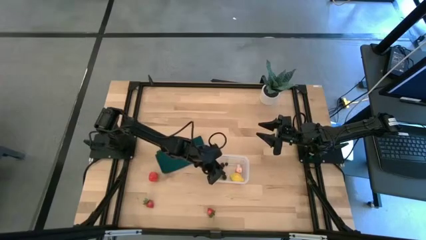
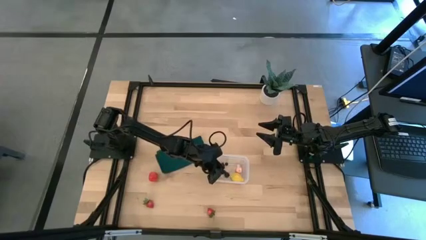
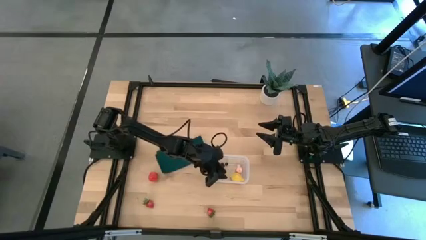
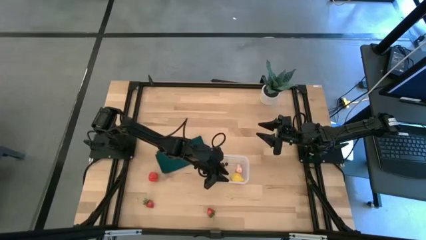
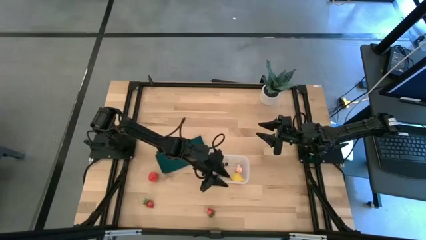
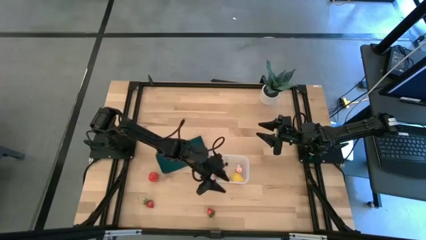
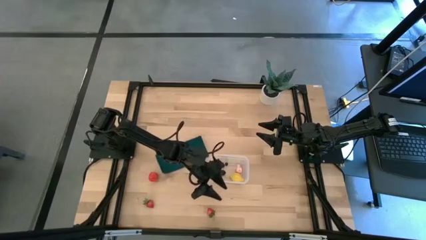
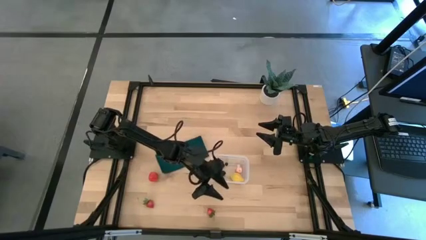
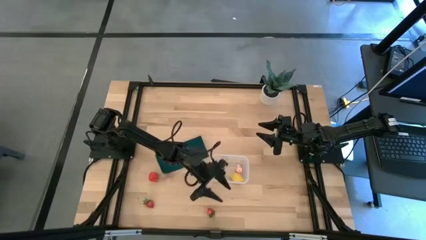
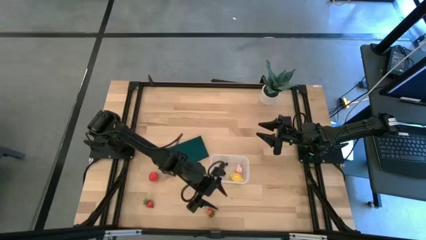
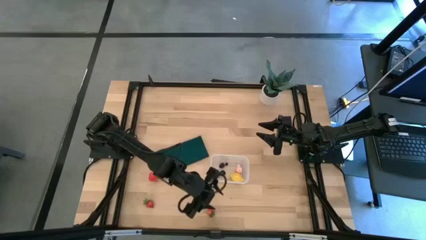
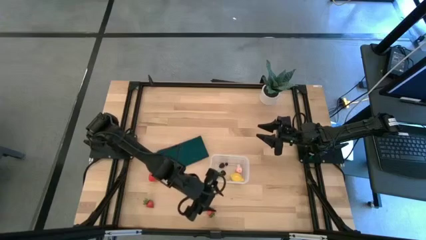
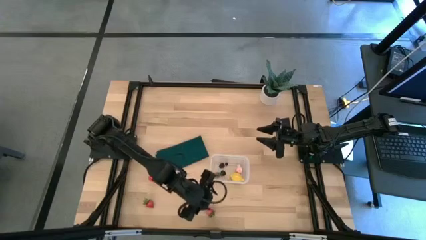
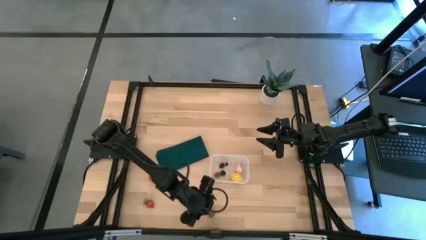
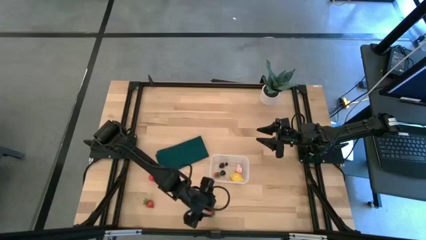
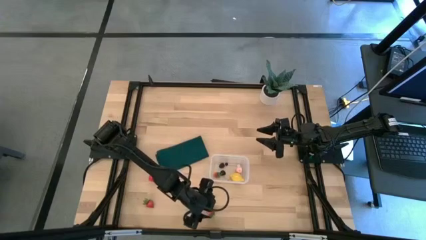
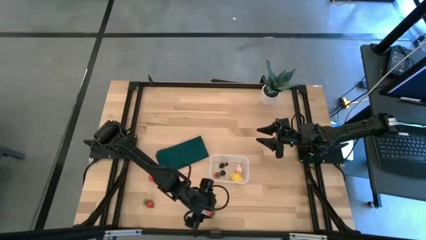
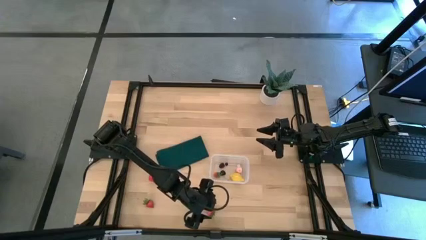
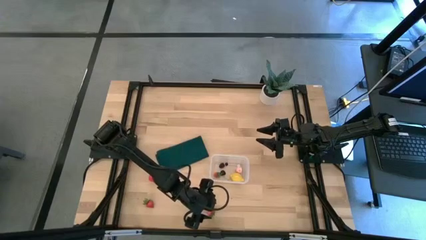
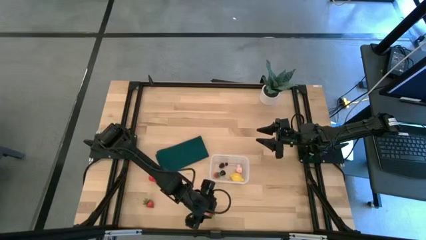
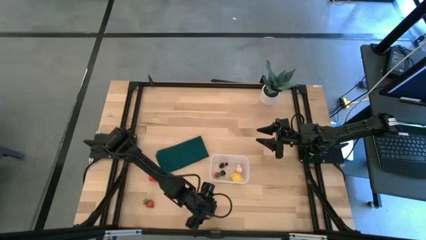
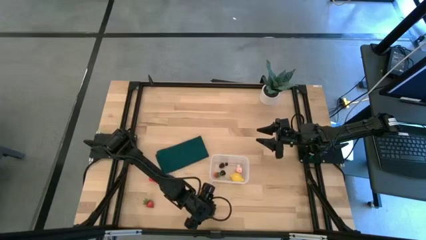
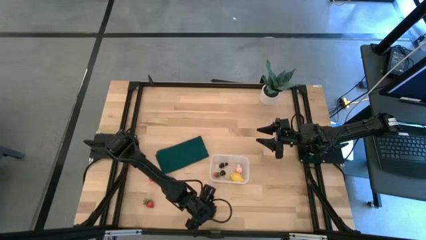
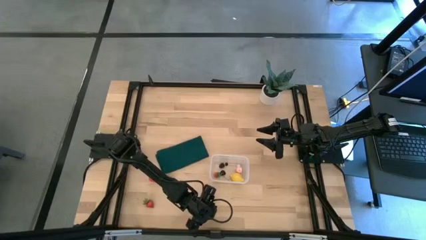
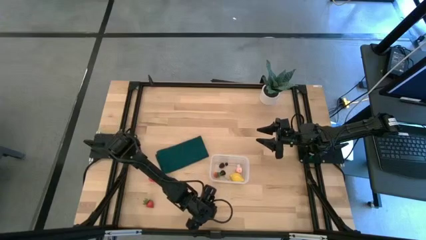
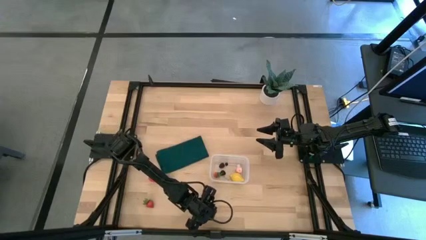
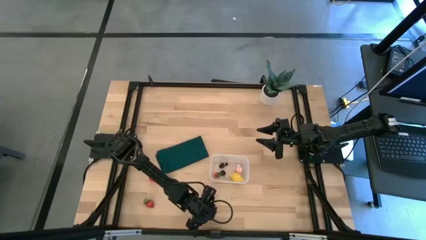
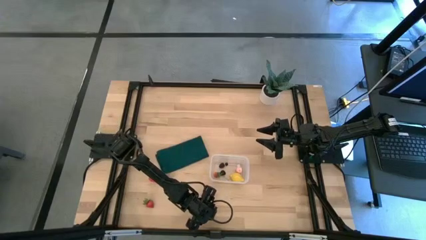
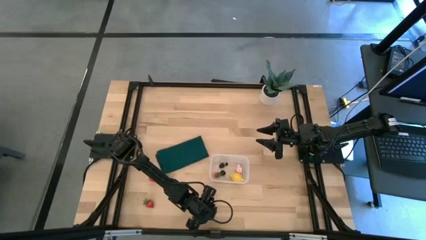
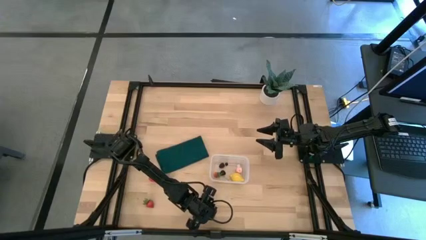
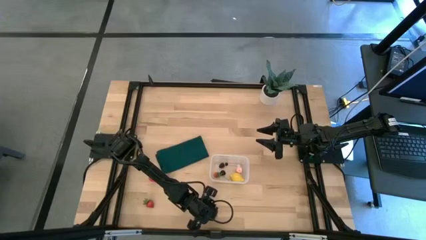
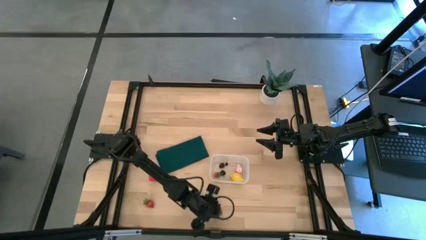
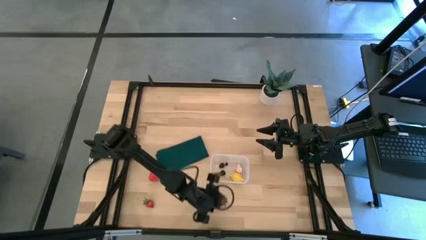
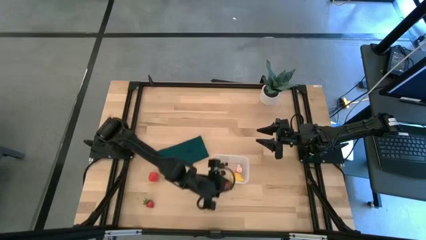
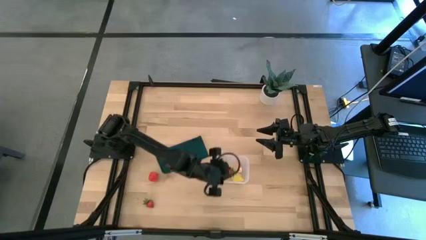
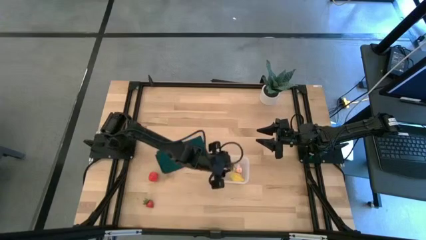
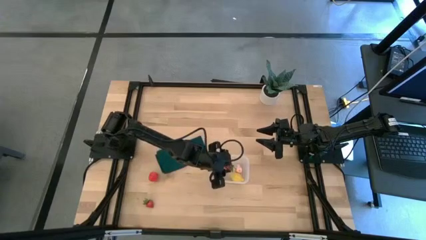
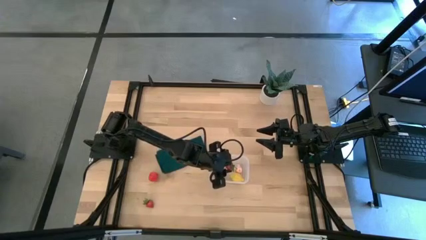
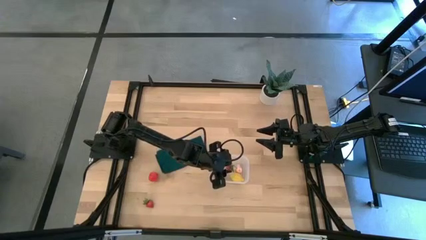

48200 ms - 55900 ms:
Task: Pick and placing Produce into tupperware
Put the bottom right strawberry into the transparent bin

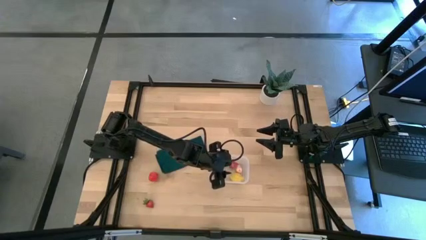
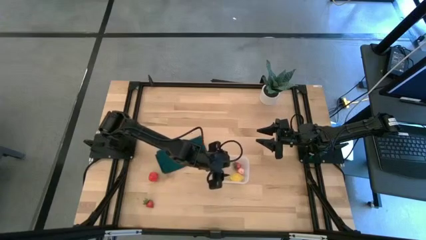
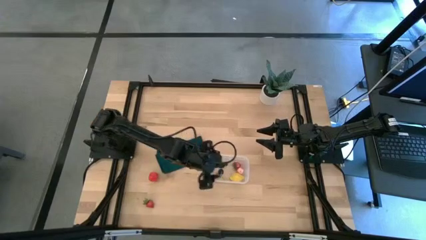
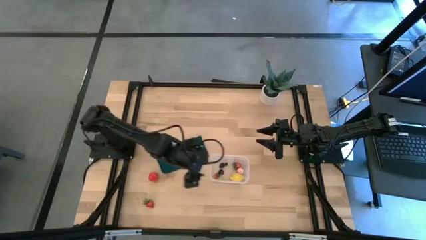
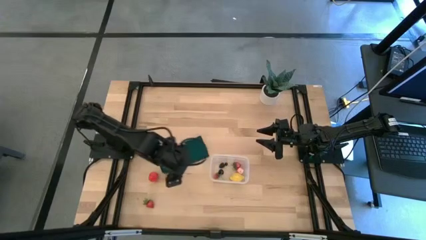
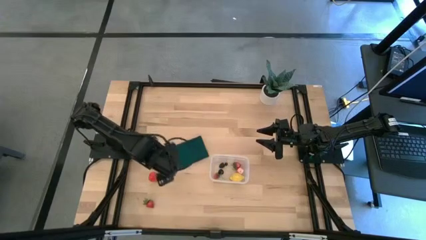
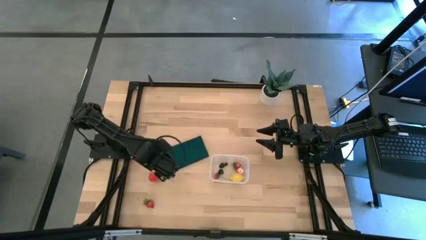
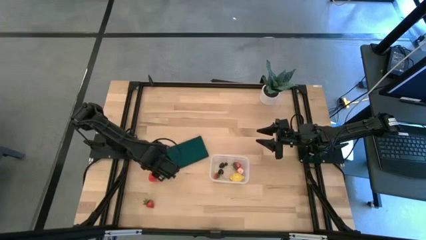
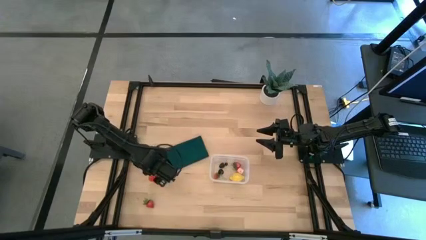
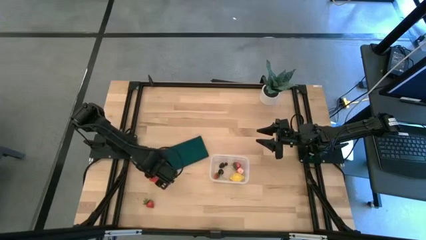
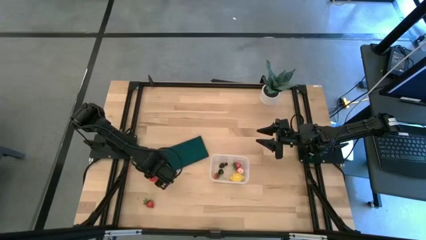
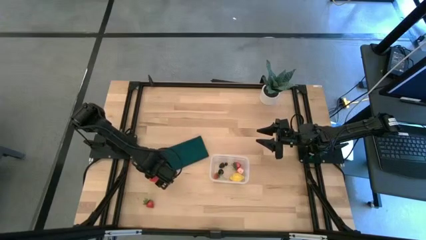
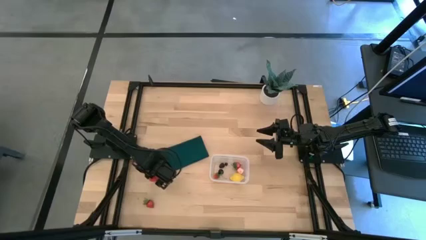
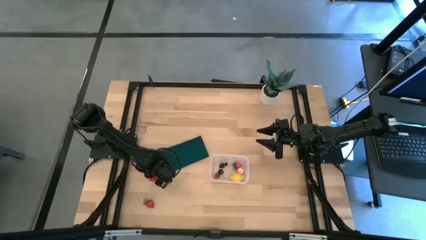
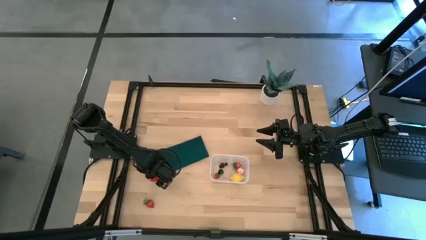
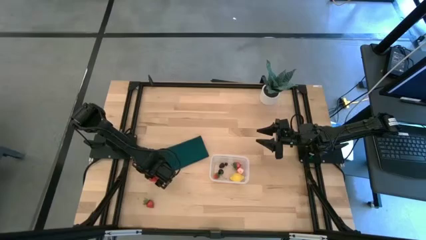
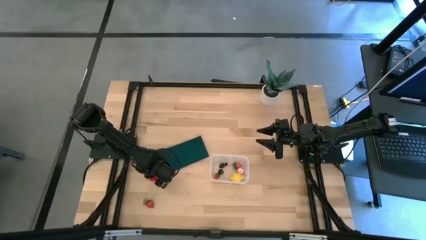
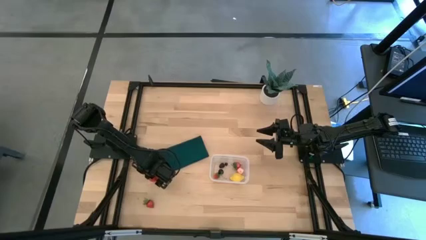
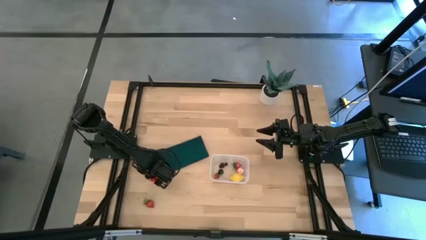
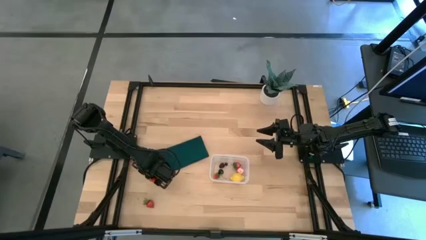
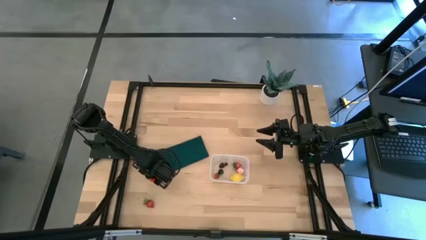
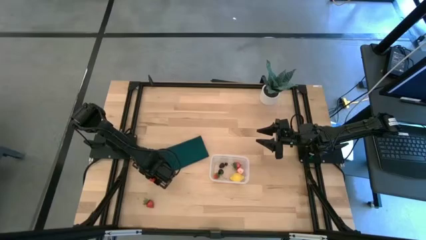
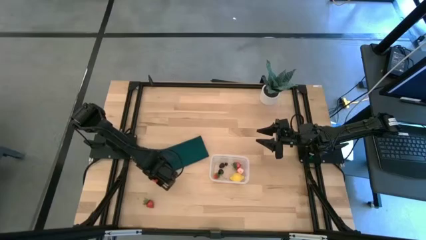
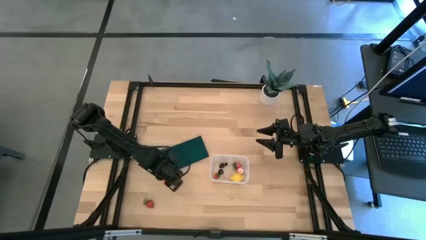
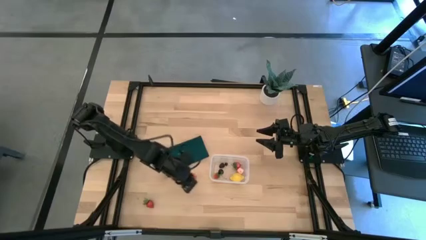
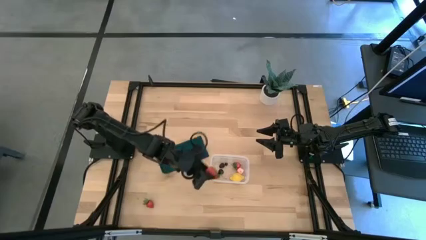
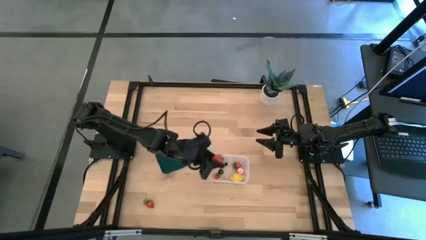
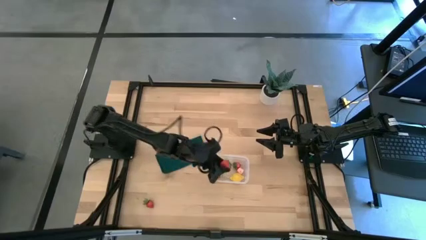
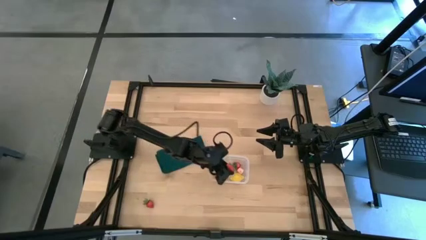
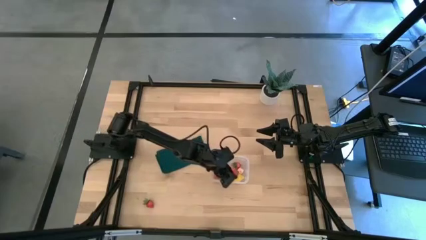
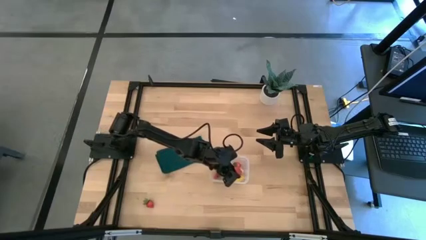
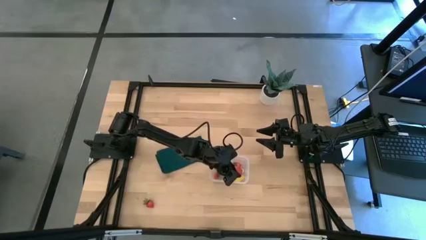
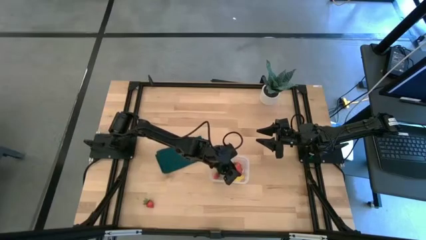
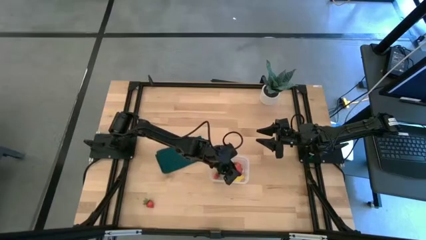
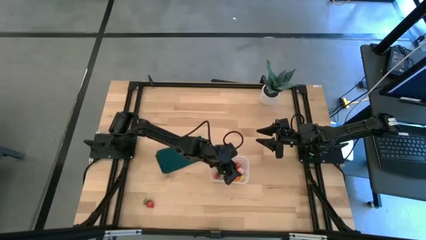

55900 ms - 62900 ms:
Put the top strawberry into the transparent bin

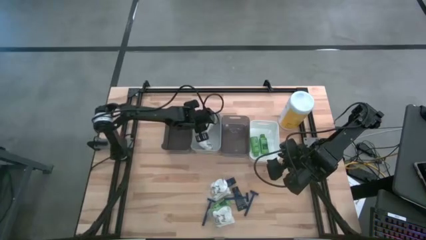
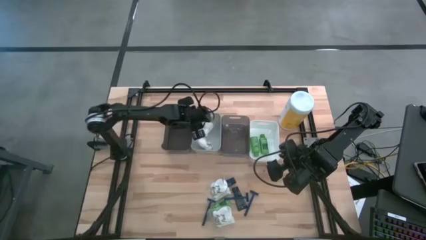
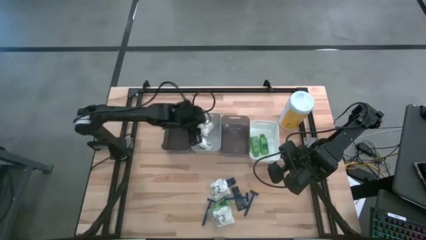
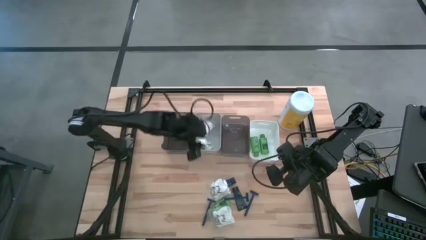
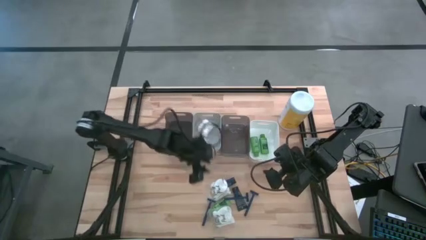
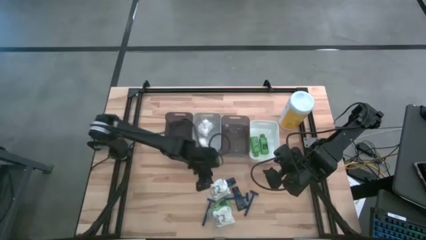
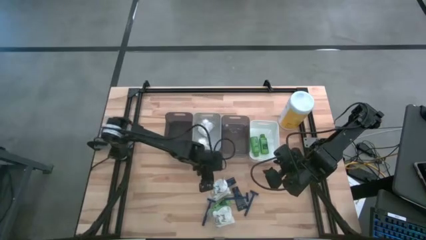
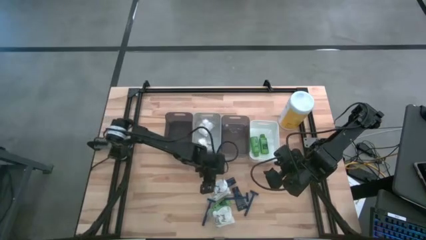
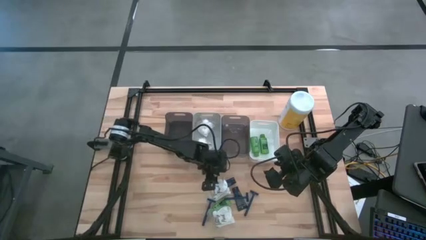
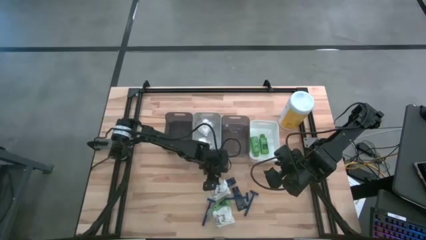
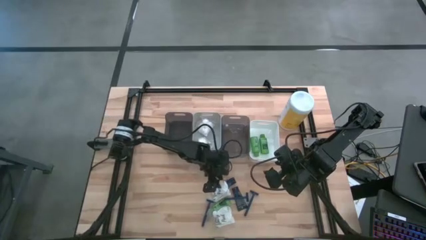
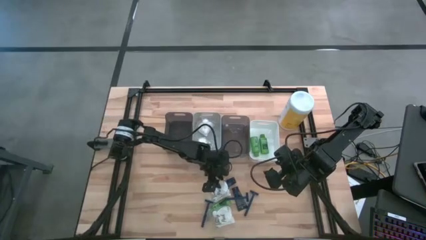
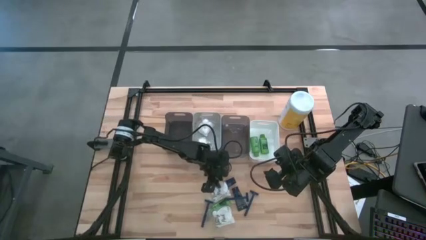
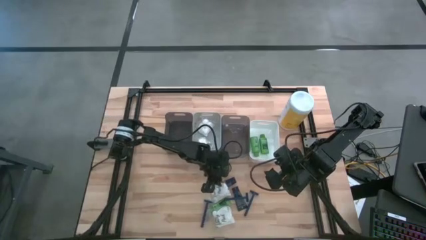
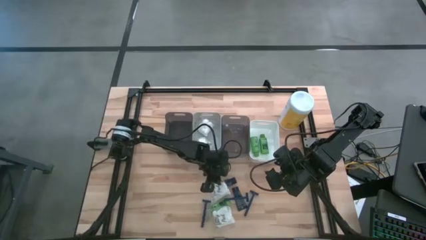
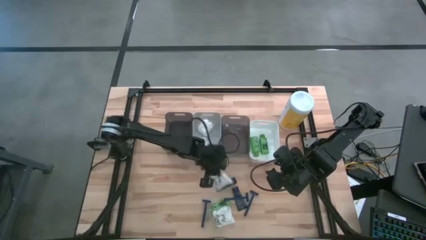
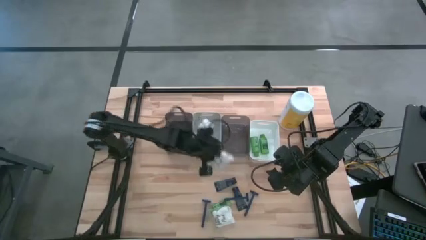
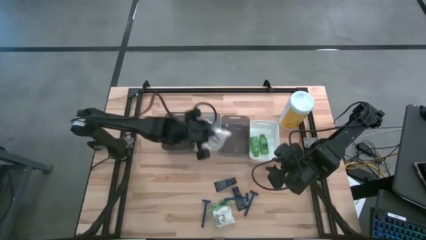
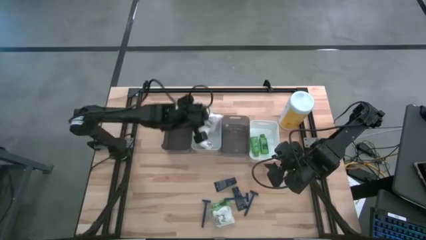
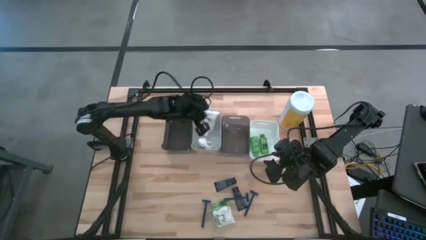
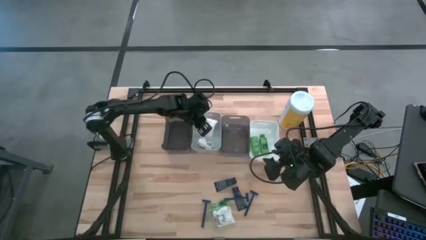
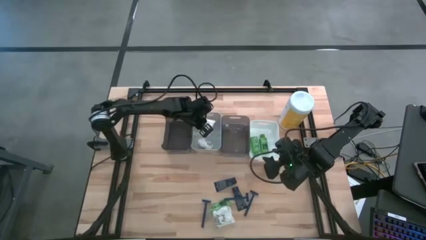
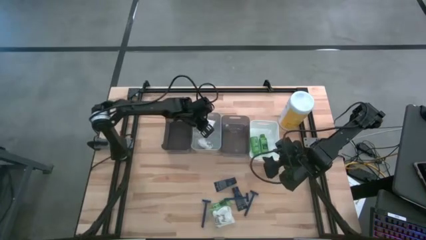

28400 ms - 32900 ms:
Task: Pick & Place Travel size toiletries
Put the white cotton pack into the gray bin
